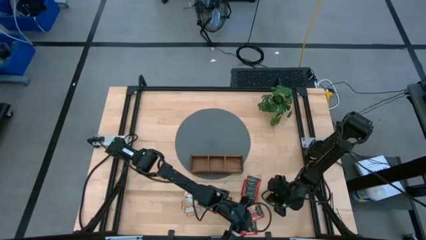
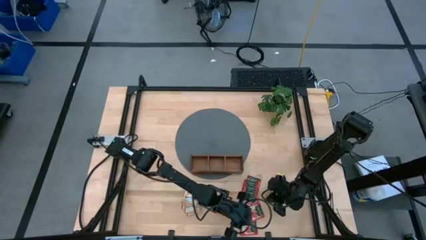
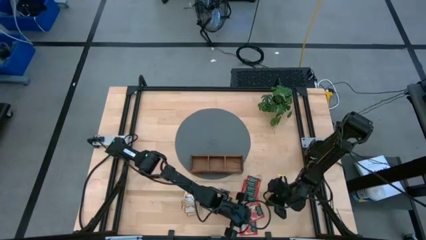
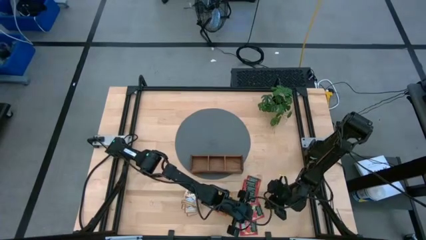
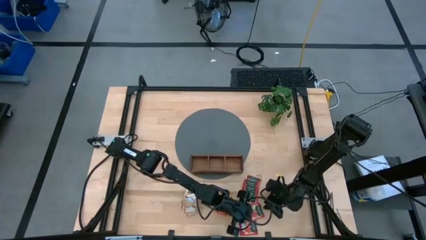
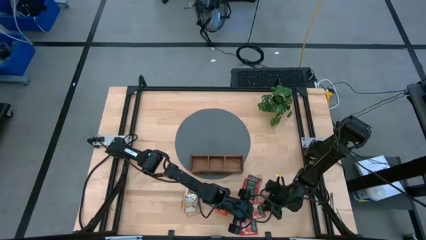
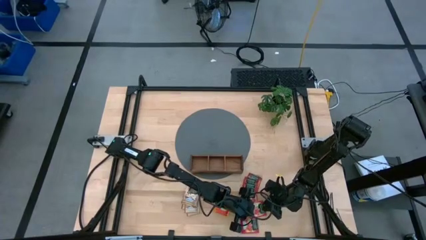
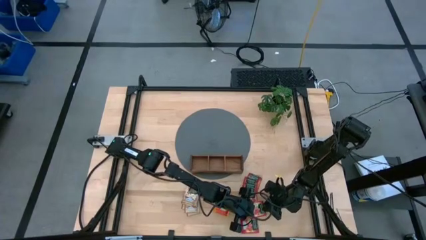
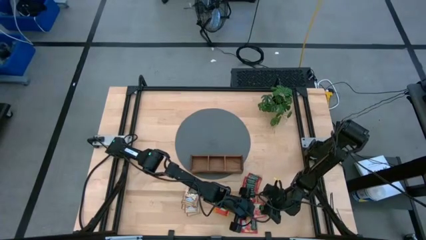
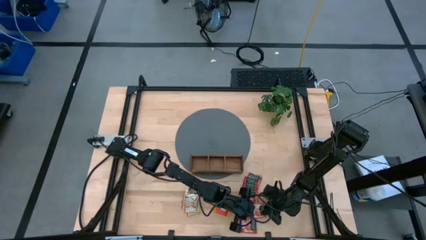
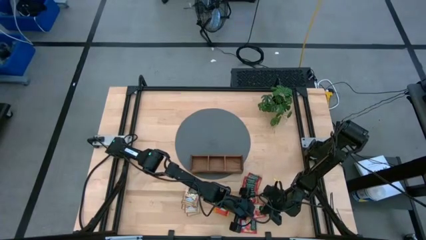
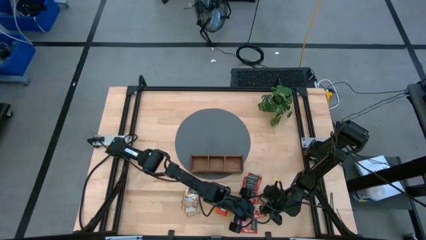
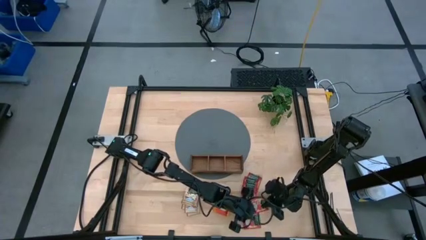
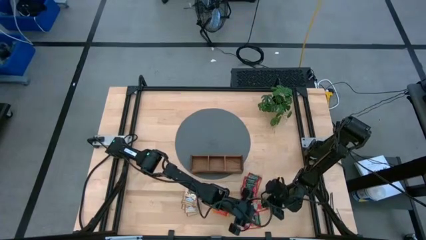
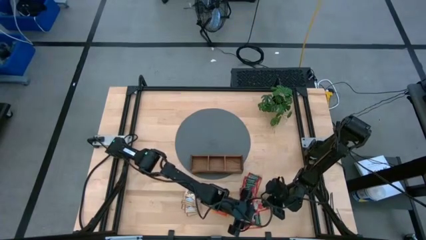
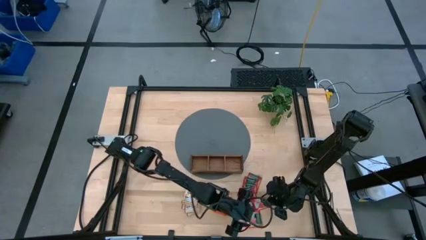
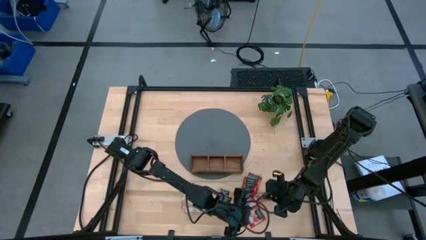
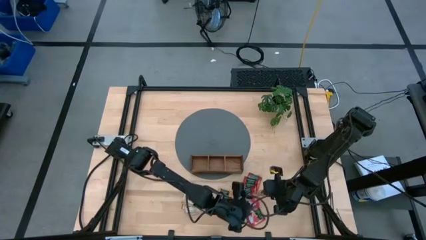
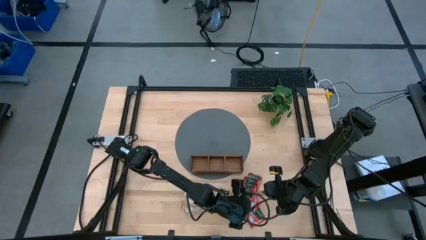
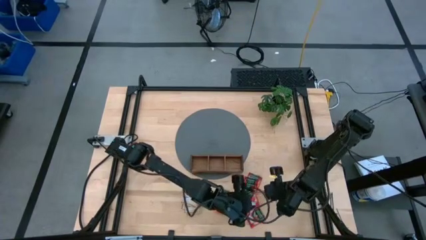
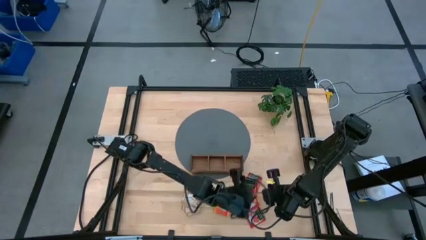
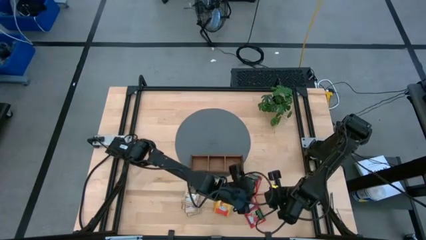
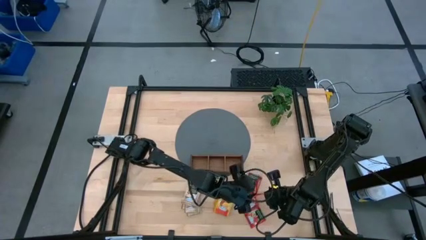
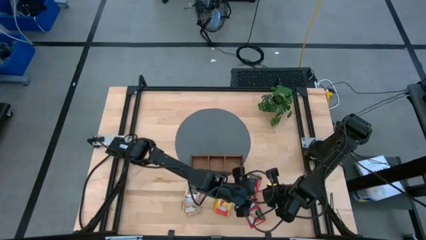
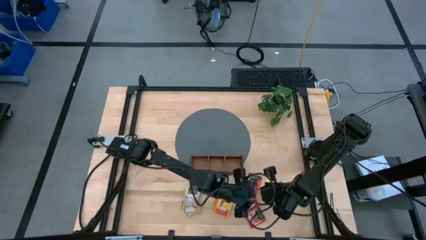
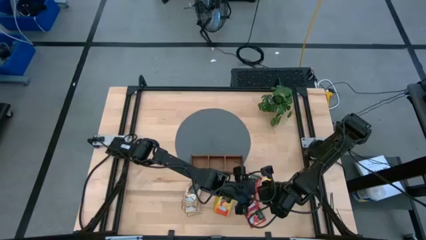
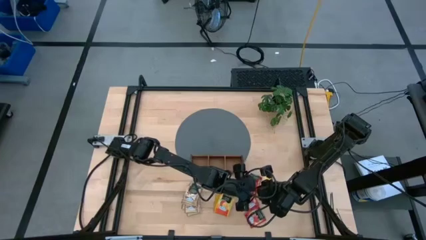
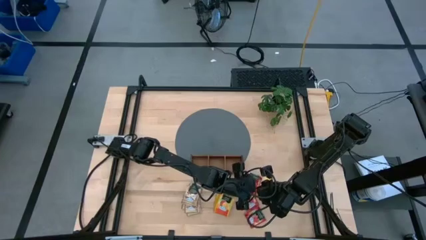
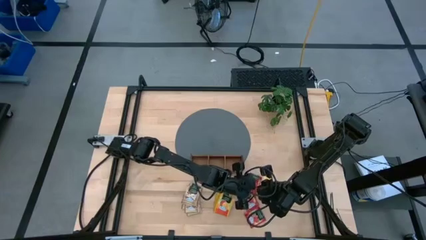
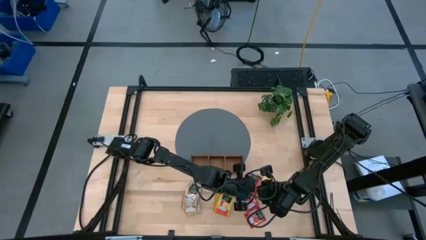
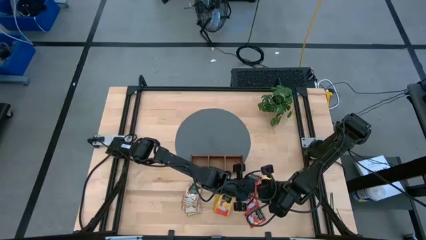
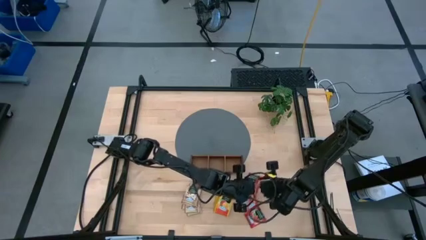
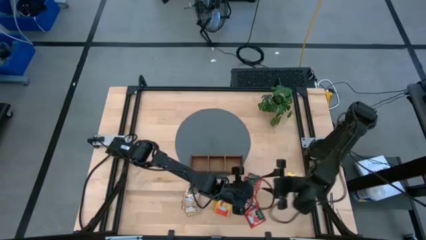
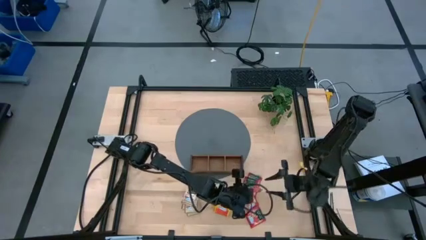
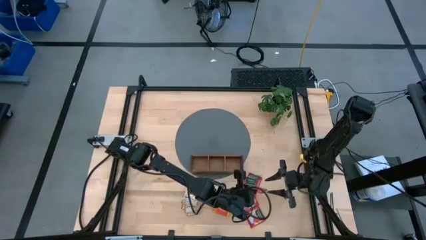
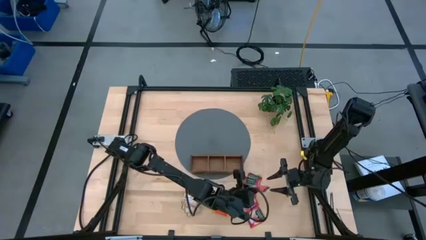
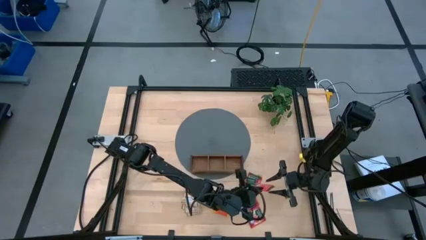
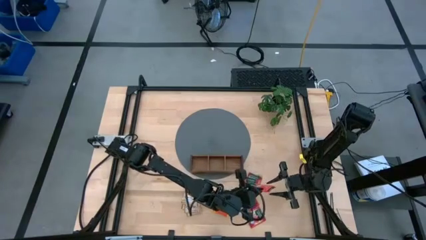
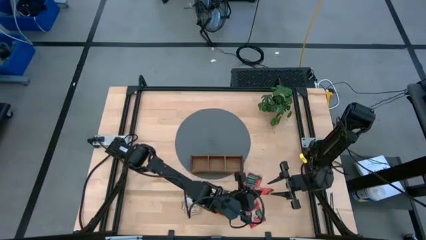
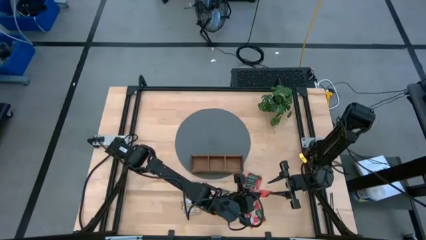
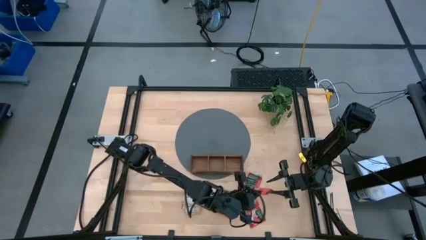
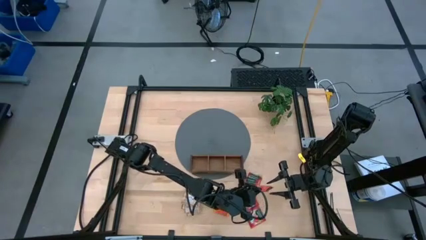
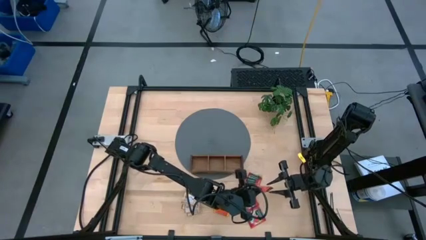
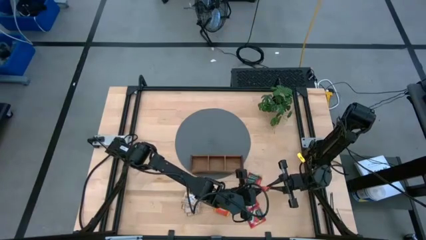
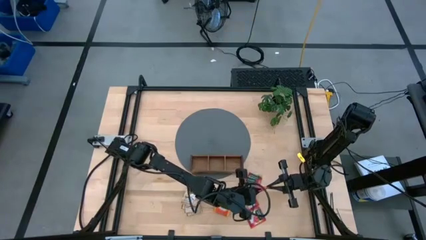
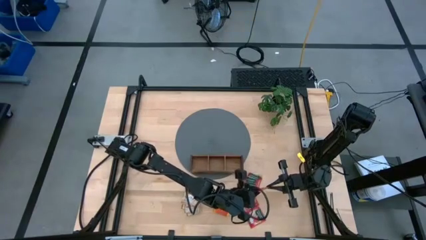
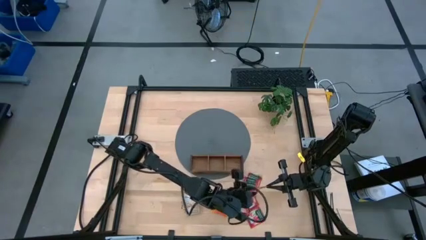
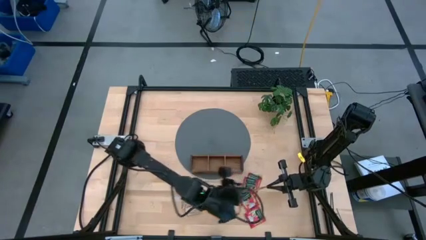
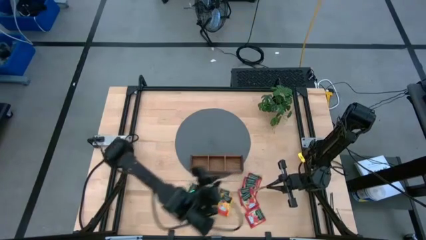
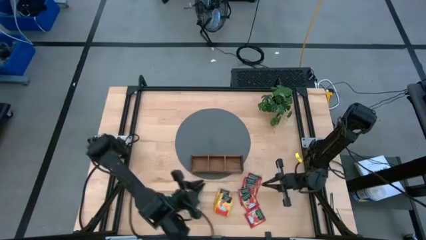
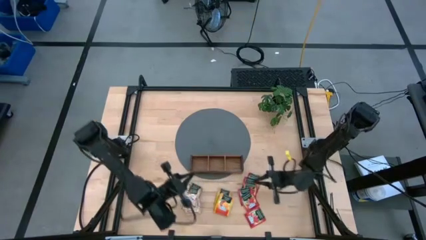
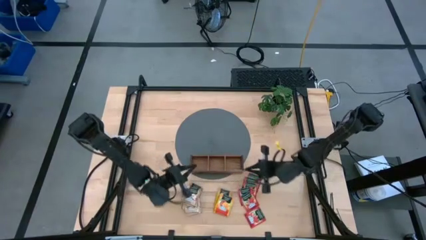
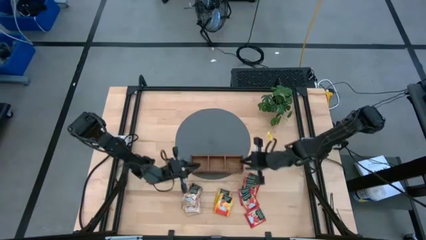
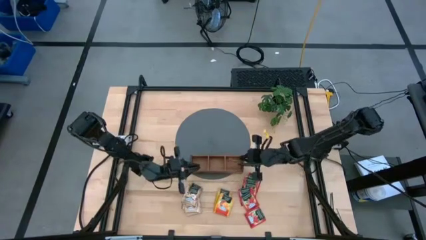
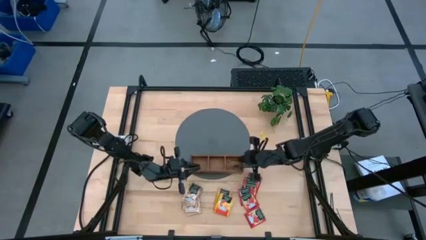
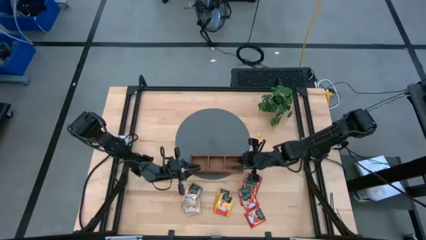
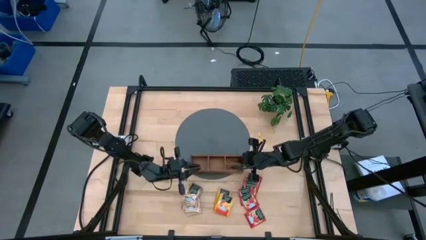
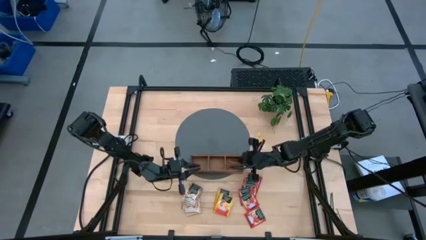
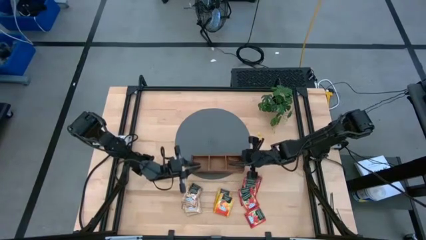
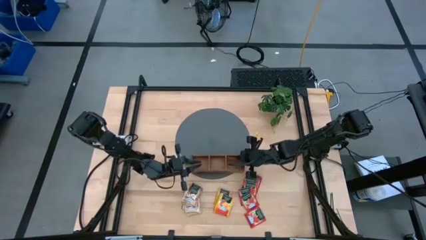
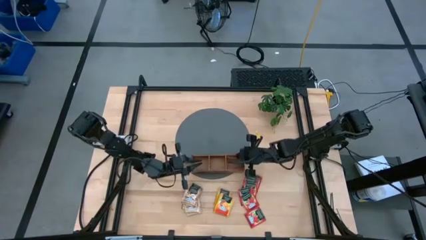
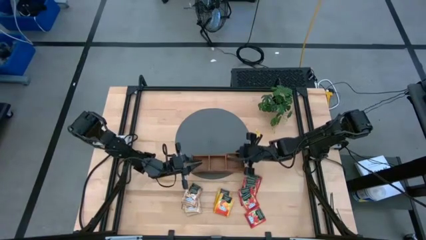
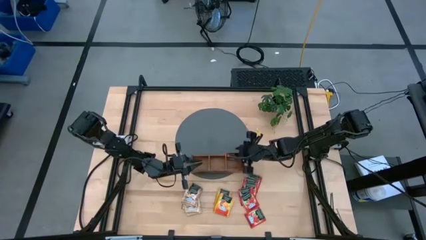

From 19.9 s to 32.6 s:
Task: Pick & Place Tea
Put the red tea bag into the right section of the wooden organizer

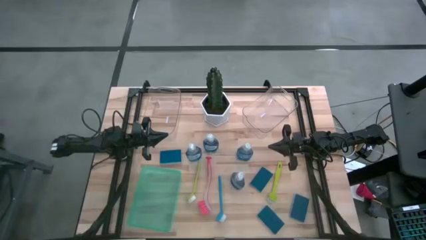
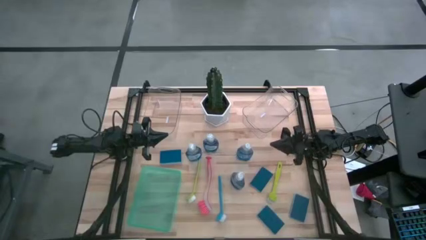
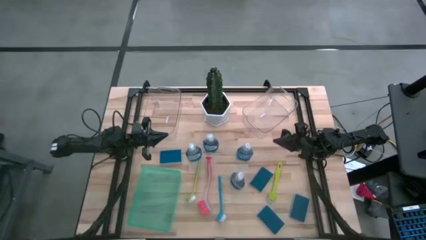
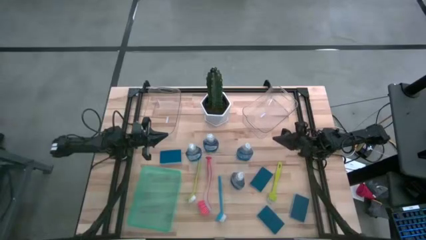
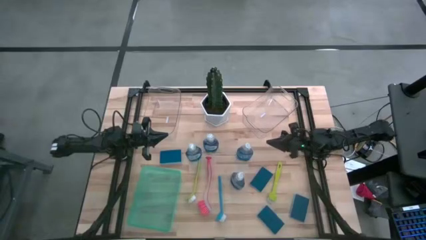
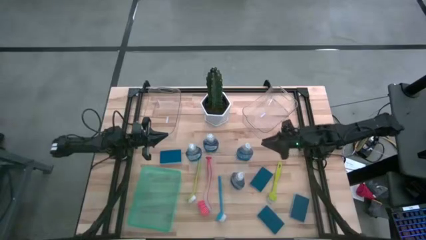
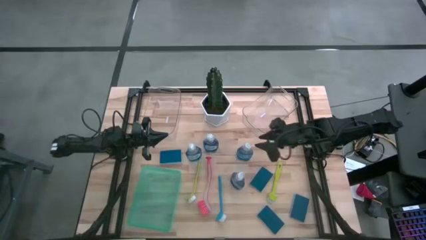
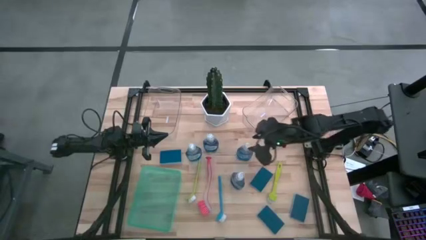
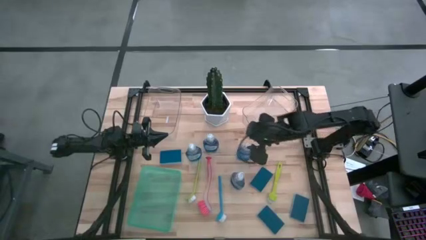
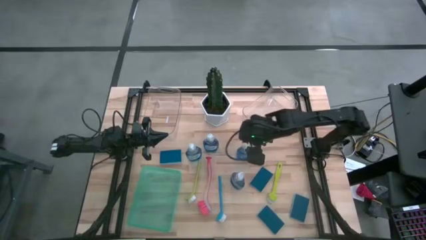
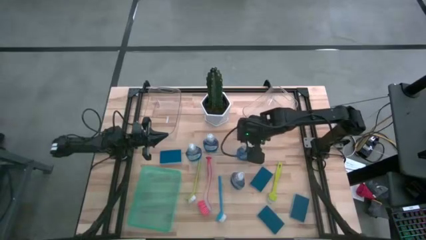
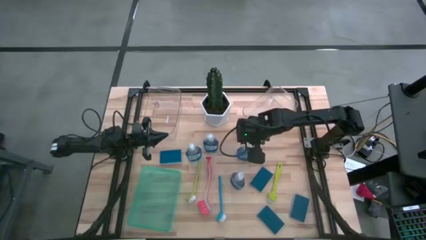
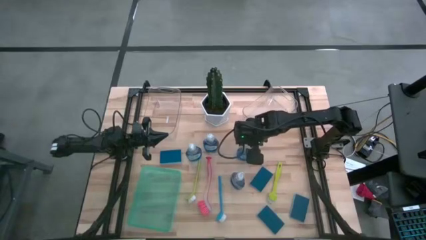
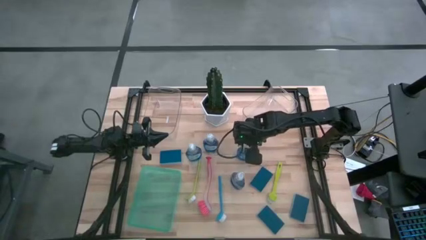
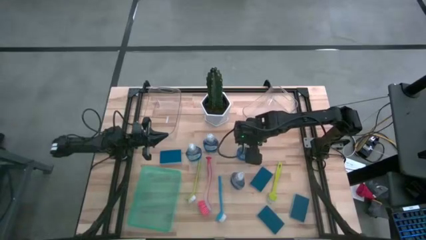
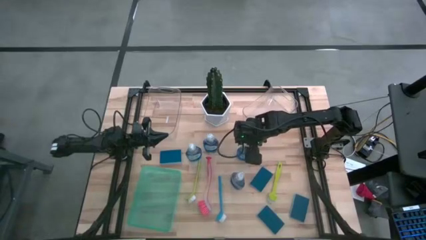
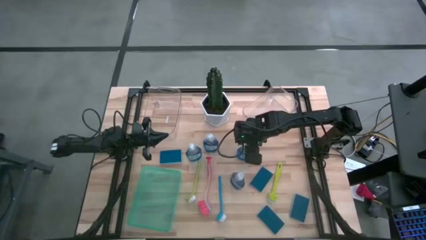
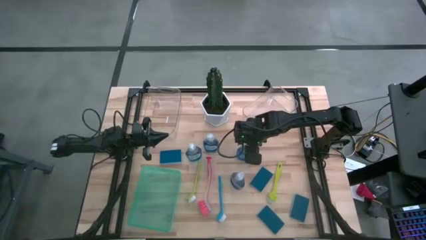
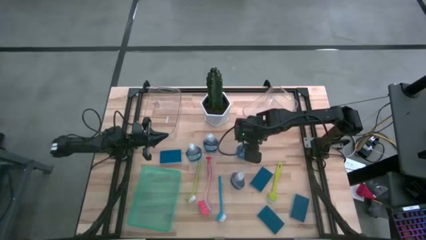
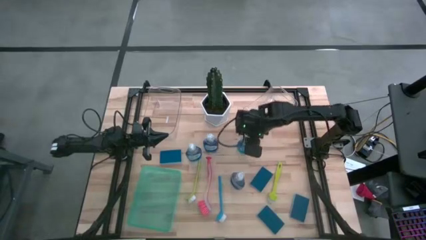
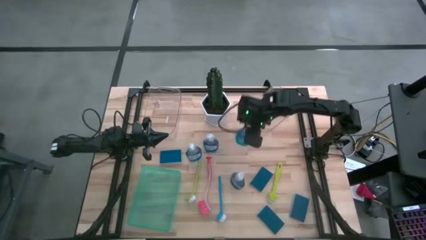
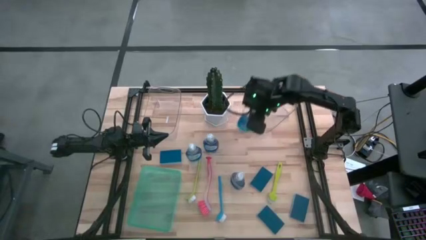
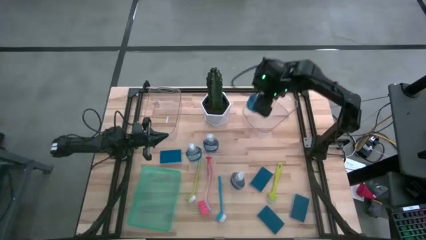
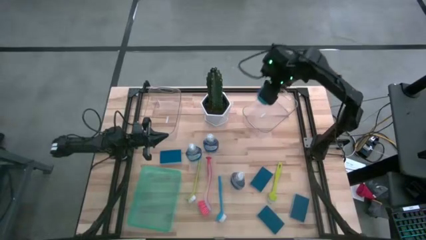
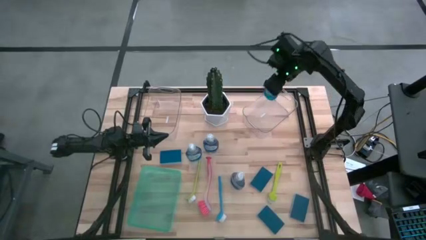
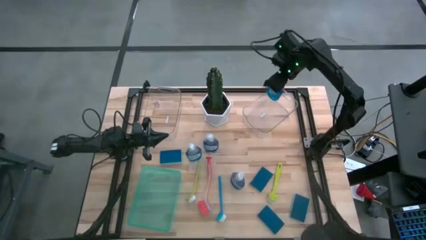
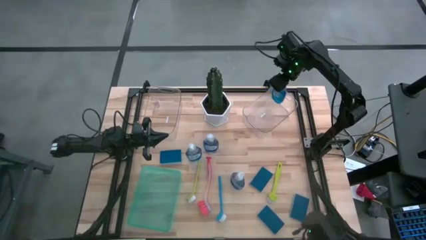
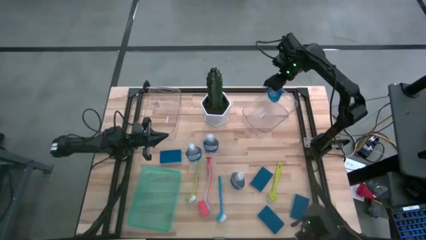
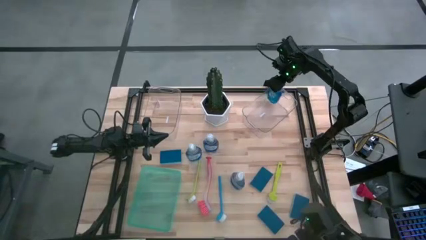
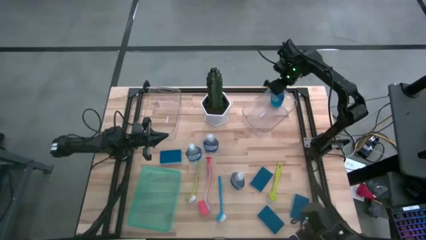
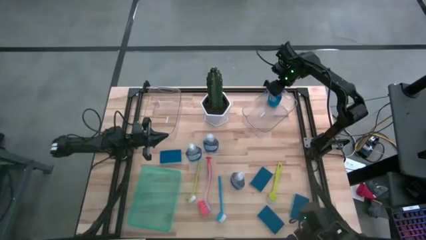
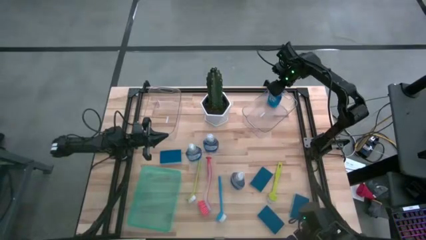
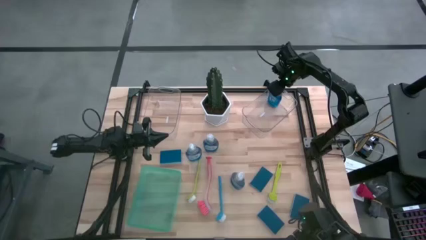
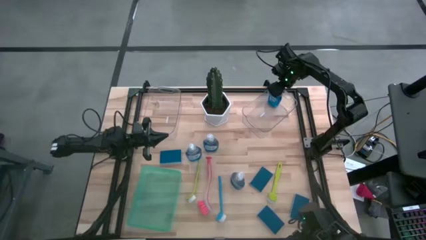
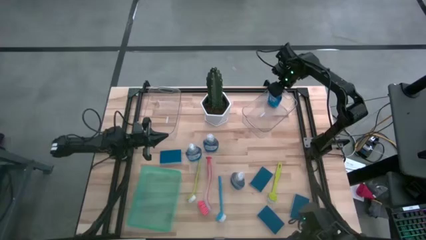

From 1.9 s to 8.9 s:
Task: Pick & Place Kitchen Sink Supplies
Put the dishwashing liquid bottle into the right transparent bin
